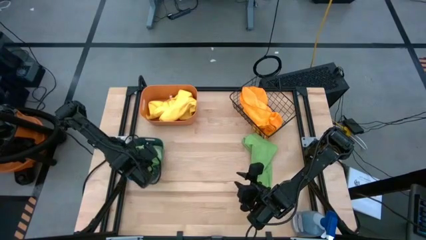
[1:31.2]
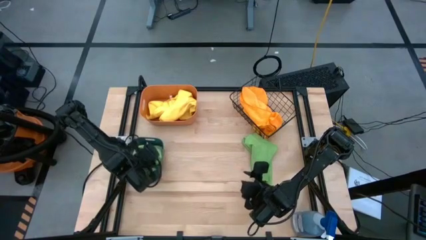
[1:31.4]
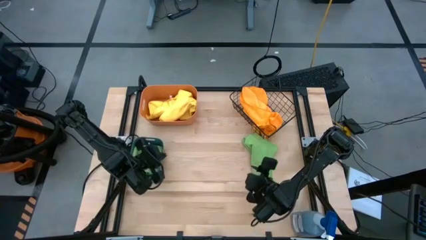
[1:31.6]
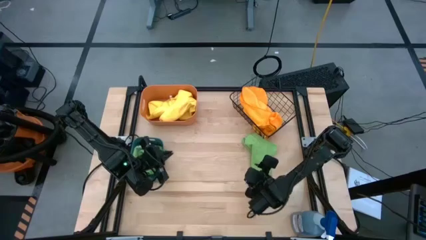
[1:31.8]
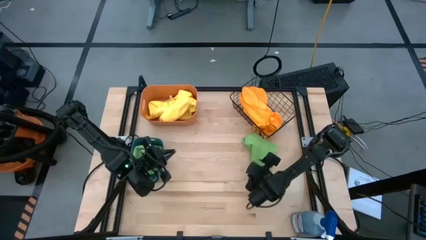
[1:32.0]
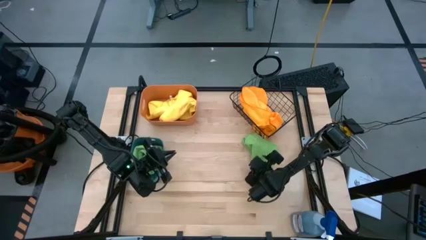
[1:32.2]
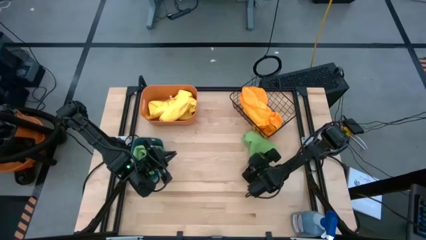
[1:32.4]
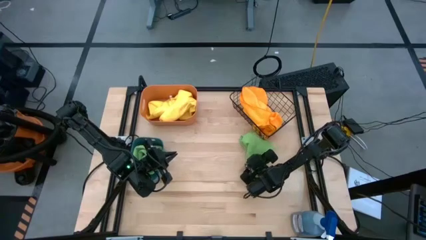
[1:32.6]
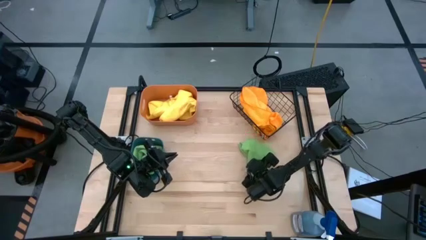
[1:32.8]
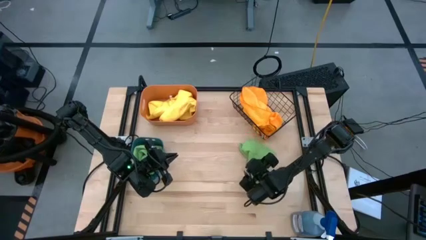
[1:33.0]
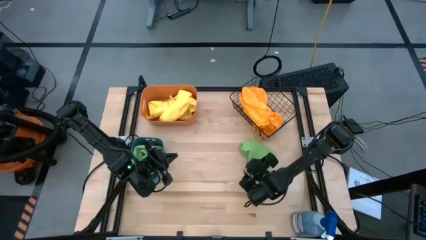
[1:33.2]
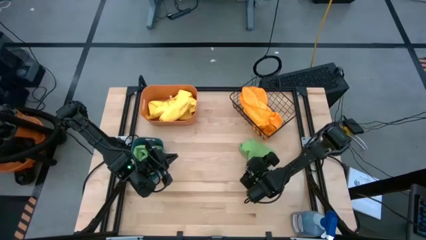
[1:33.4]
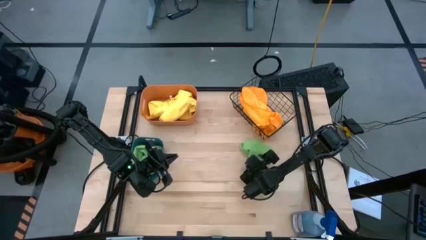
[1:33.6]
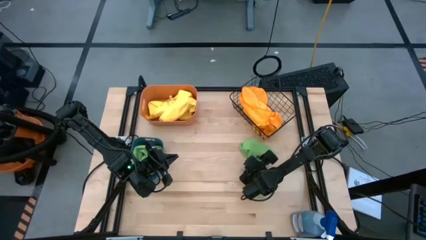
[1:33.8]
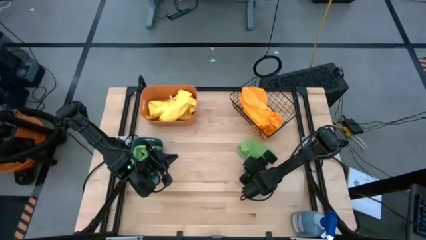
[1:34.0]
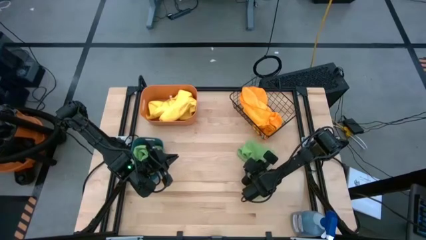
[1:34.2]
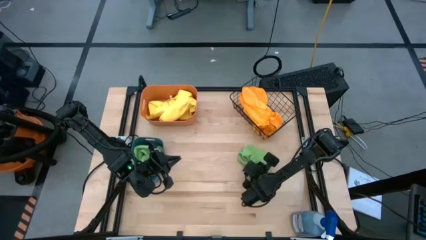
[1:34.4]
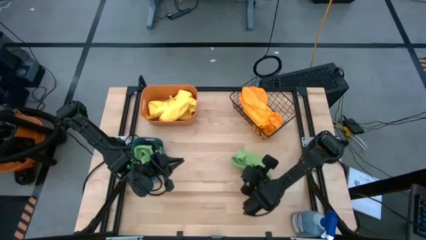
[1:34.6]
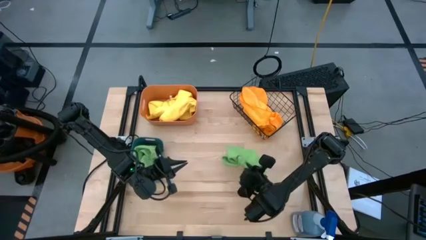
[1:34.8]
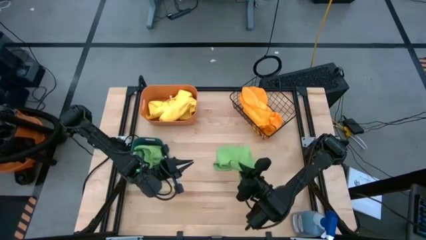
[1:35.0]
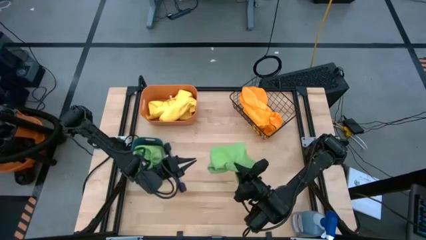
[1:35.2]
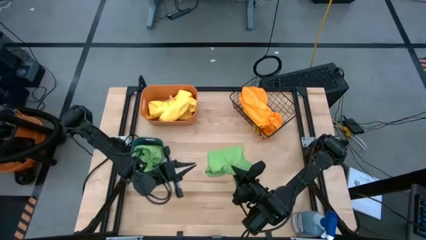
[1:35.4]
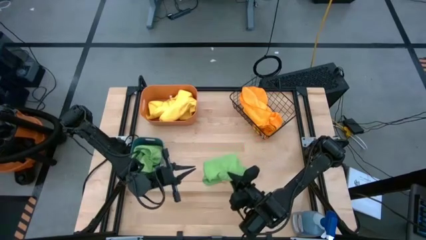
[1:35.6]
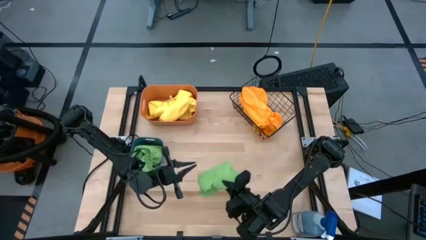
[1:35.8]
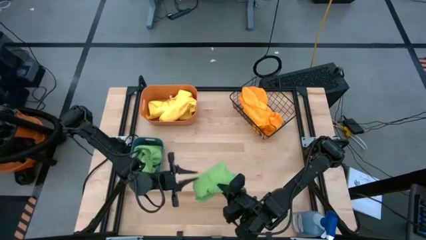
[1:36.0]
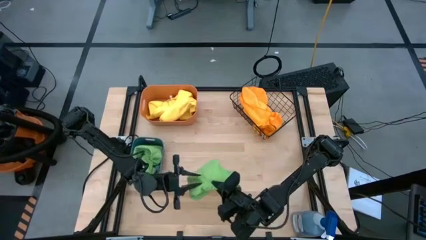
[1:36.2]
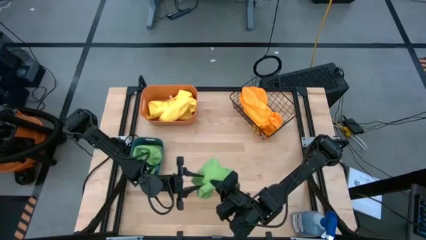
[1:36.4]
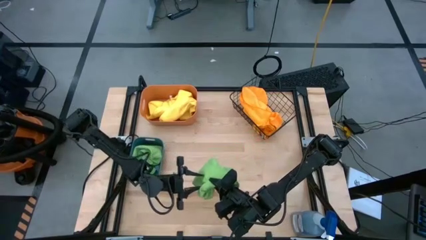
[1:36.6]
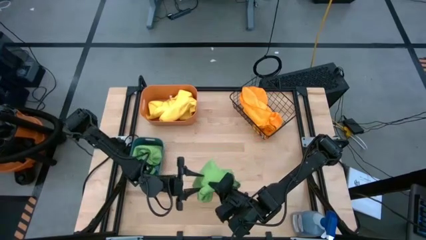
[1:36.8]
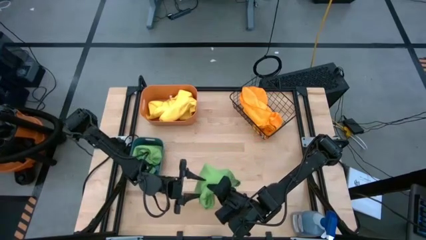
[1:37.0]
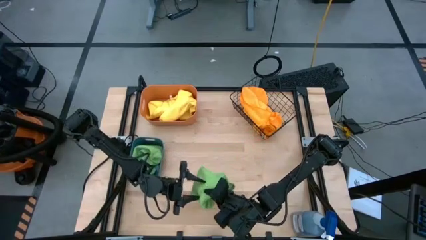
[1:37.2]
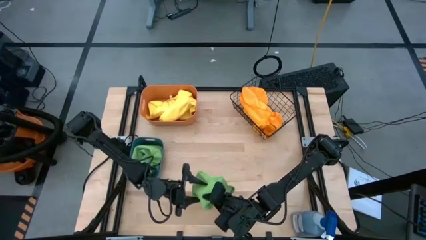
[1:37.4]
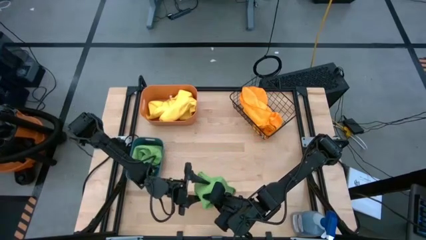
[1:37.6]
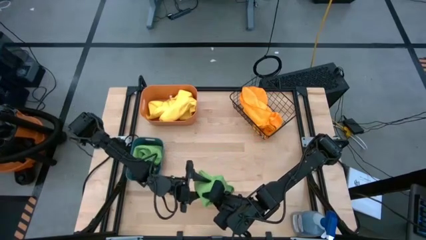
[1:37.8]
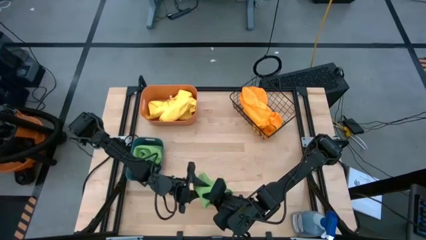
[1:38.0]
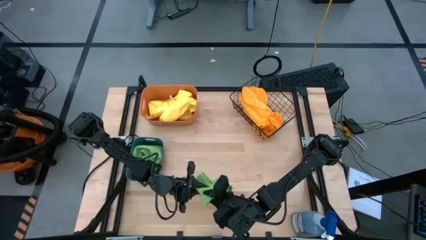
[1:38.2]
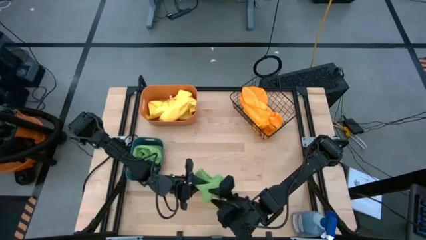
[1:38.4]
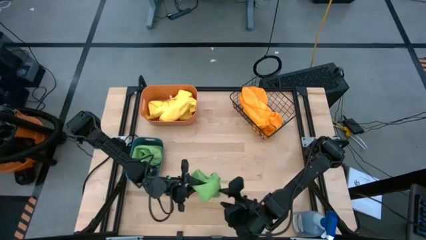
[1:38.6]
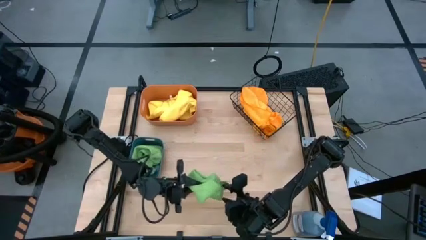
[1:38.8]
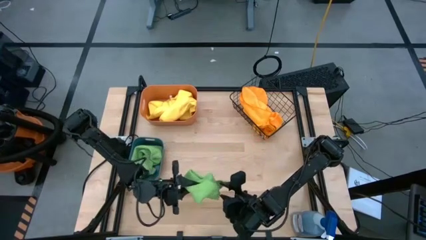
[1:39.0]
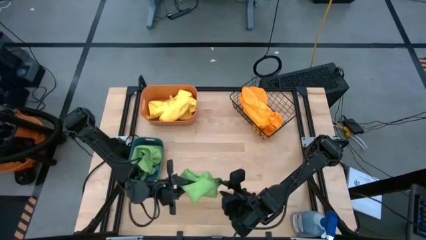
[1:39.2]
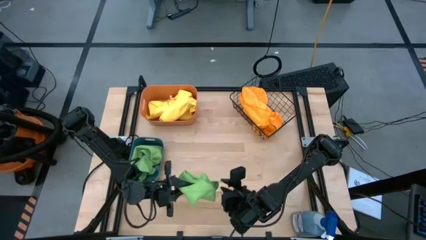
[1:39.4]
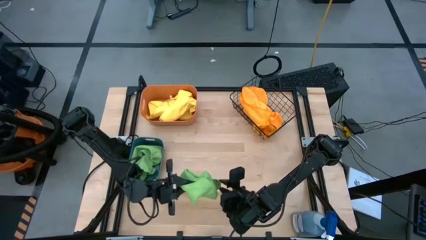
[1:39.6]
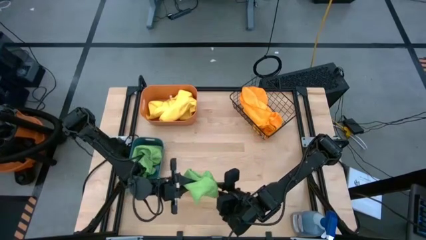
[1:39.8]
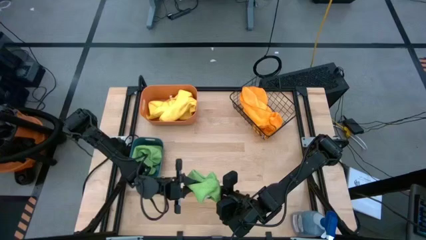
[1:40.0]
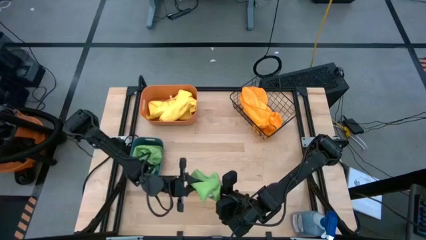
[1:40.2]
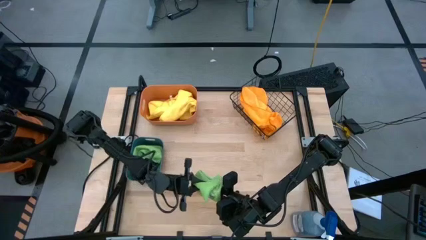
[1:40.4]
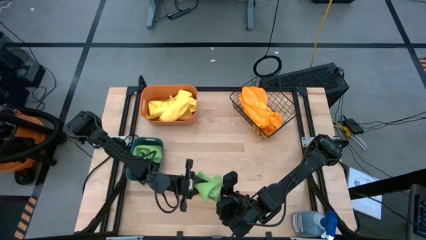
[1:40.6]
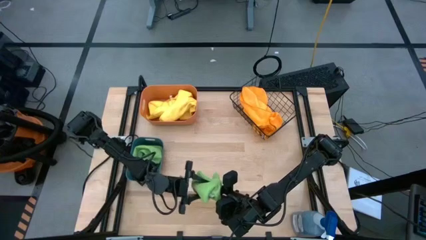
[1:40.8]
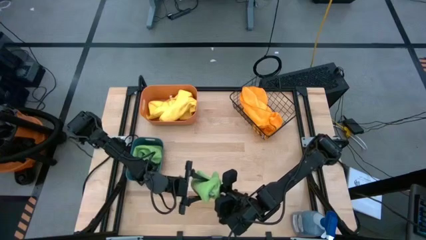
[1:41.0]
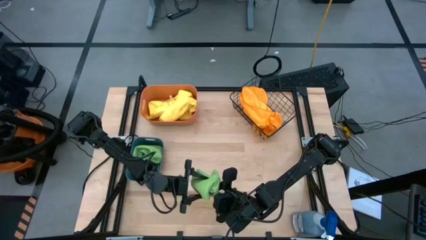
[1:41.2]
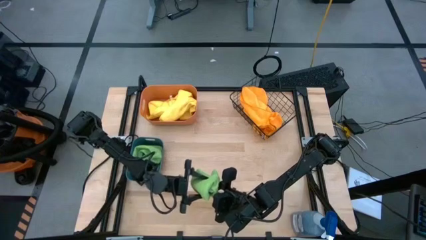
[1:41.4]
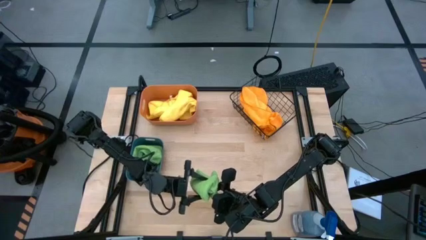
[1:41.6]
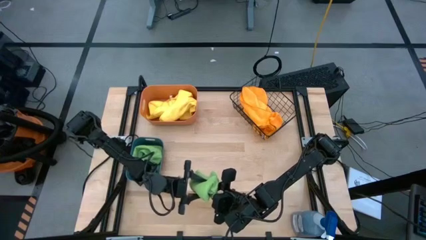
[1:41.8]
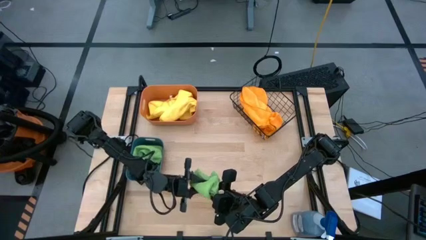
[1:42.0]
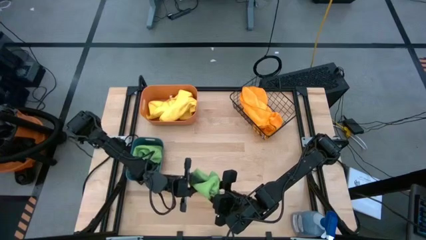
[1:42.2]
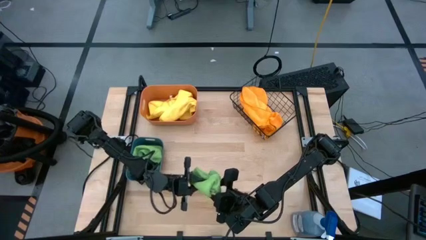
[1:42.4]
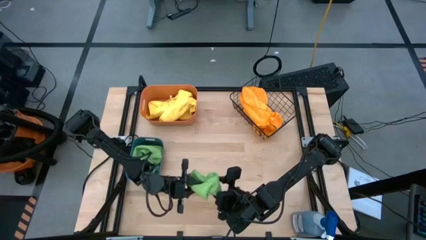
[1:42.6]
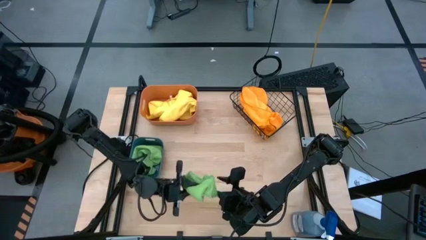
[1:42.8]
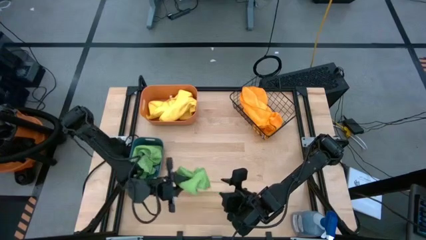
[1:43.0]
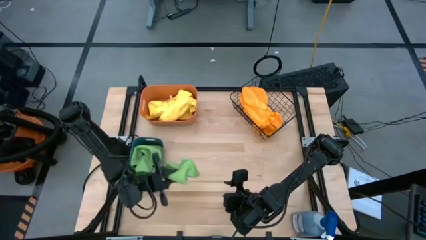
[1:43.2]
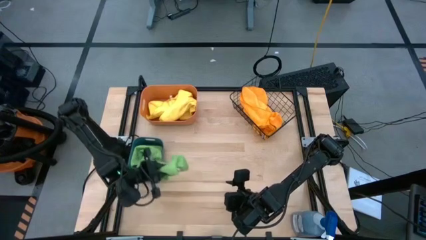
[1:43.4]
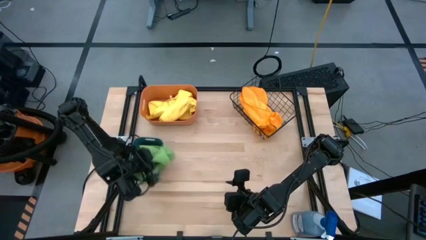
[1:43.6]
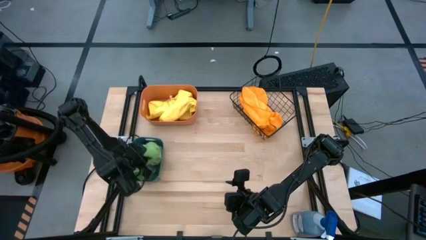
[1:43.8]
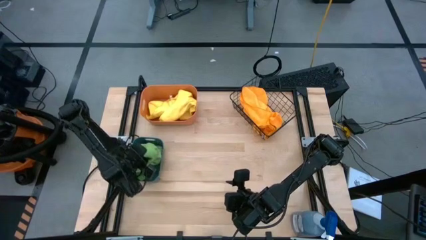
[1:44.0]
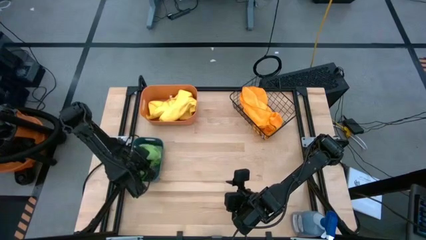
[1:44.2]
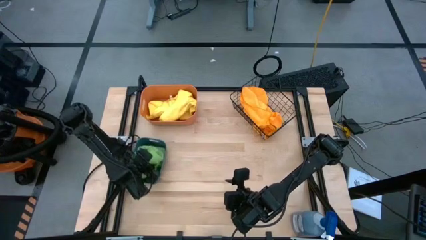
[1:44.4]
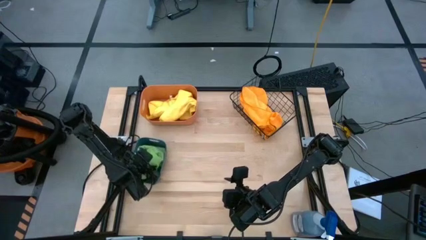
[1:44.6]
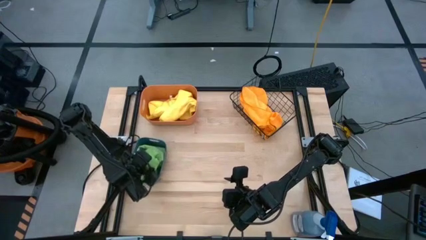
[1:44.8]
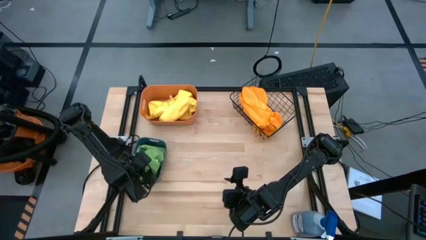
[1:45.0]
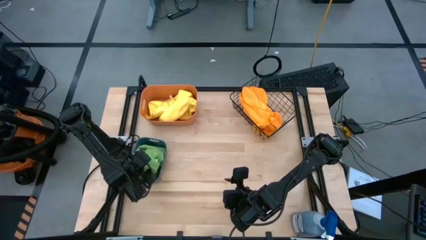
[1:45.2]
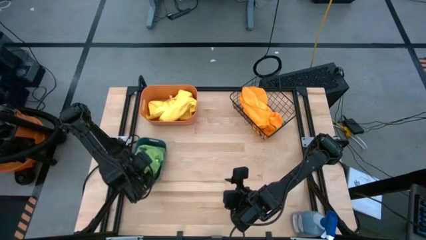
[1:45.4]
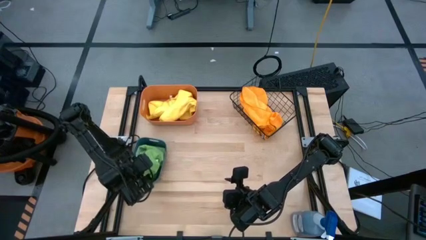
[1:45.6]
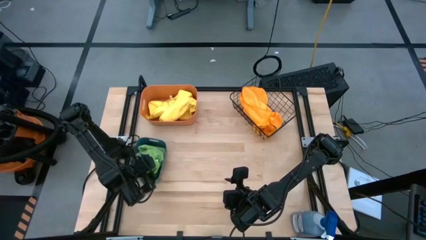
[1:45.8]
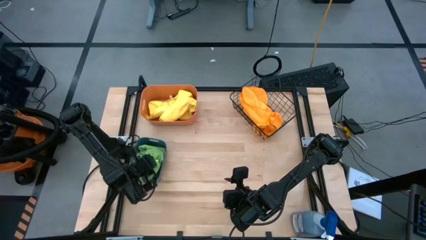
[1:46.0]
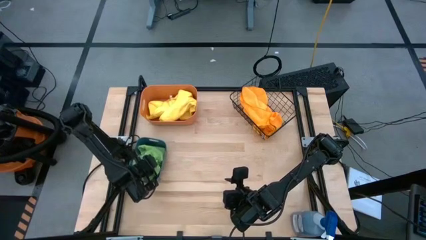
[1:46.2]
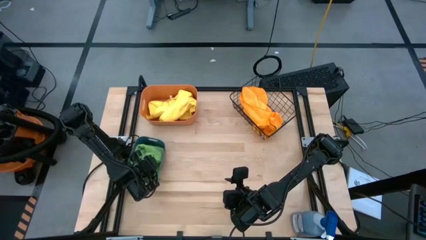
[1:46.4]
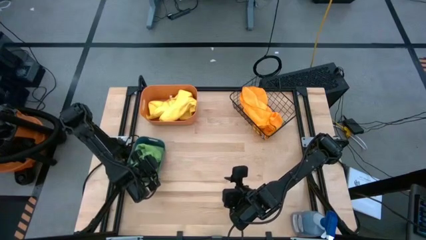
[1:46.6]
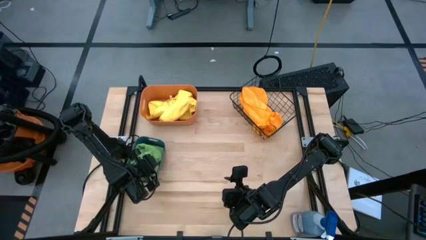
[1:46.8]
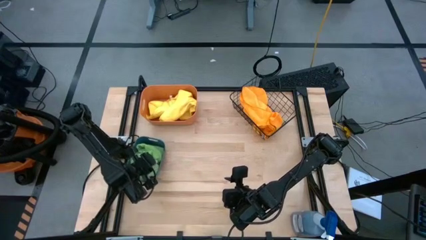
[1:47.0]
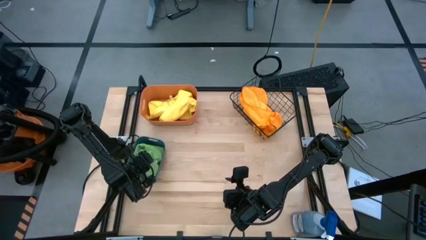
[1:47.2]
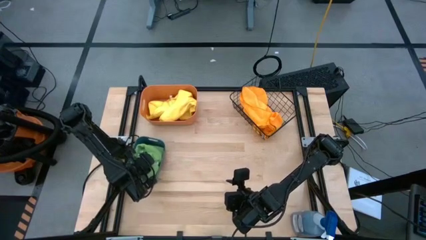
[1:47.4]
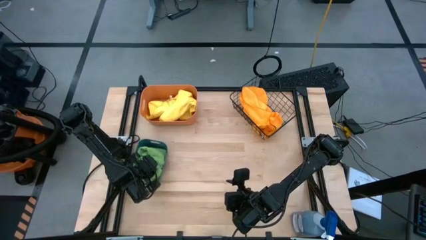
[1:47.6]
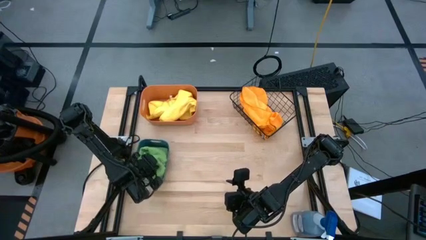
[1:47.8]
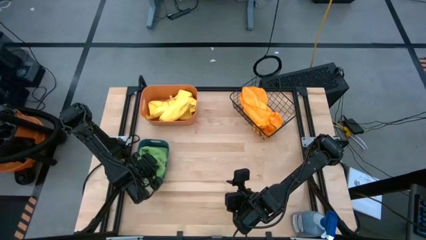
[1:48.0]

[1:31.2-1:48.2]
Task: Sort microfiber towel by color & place in baskets
Put the green microfiber towel into the blue bin
